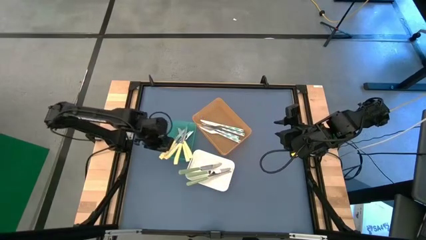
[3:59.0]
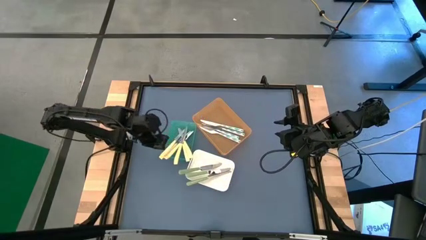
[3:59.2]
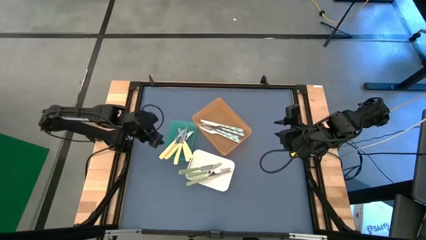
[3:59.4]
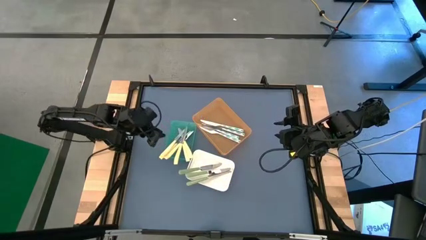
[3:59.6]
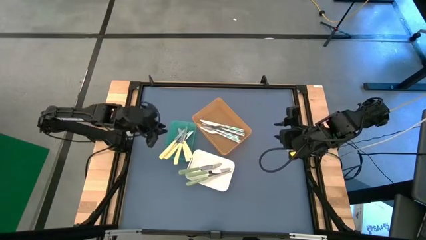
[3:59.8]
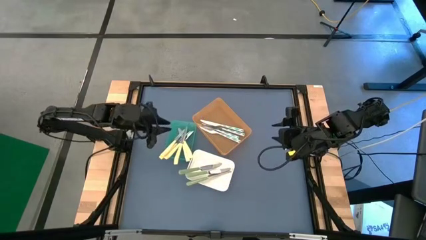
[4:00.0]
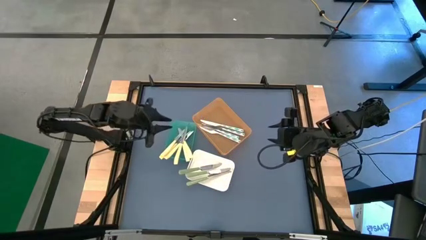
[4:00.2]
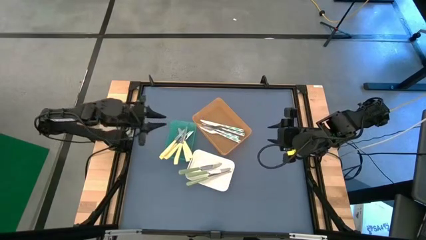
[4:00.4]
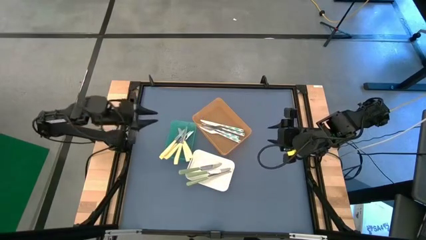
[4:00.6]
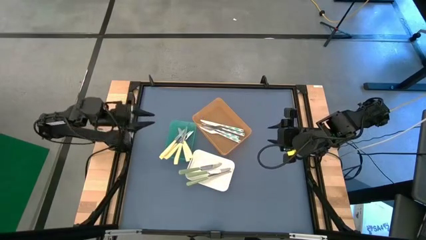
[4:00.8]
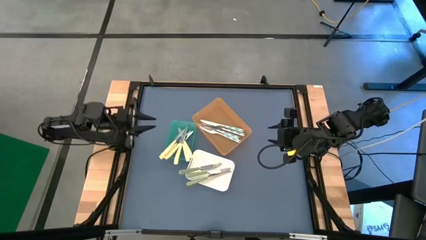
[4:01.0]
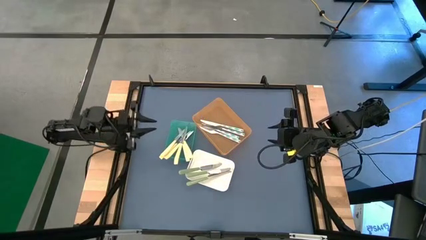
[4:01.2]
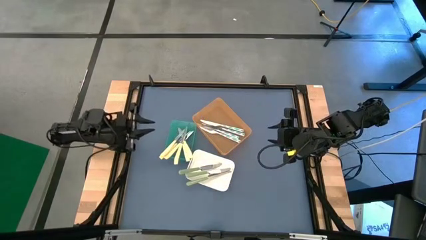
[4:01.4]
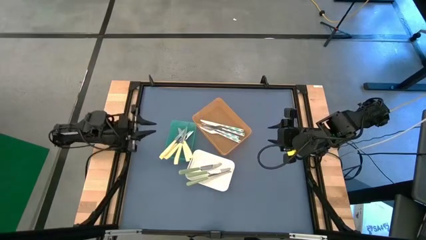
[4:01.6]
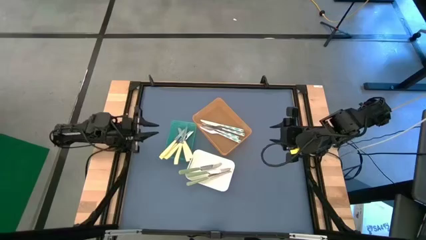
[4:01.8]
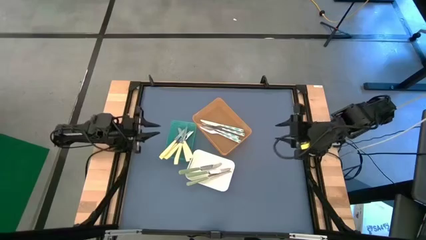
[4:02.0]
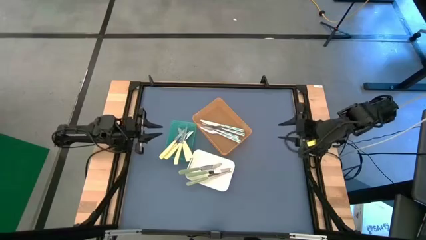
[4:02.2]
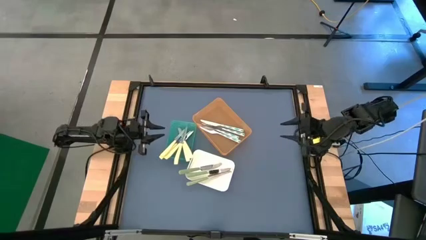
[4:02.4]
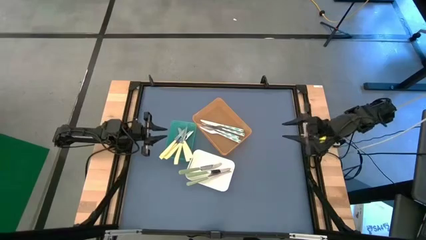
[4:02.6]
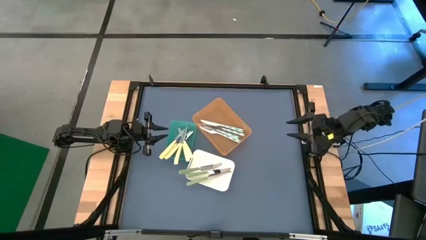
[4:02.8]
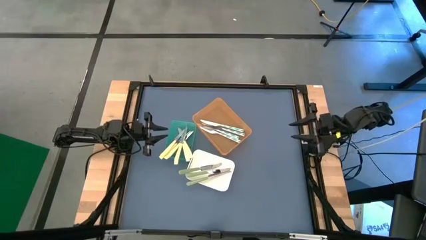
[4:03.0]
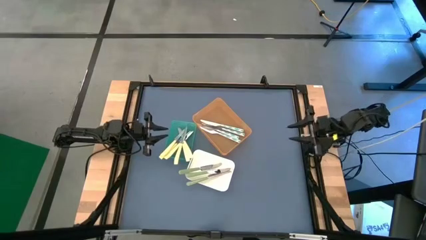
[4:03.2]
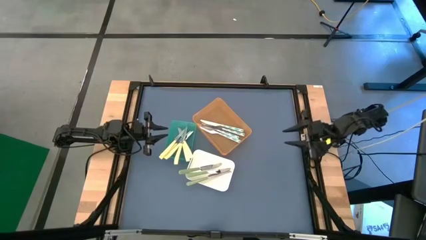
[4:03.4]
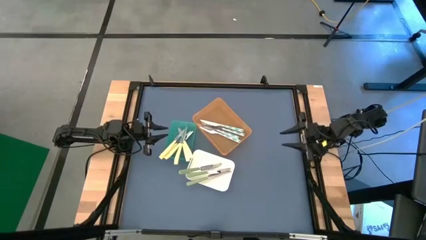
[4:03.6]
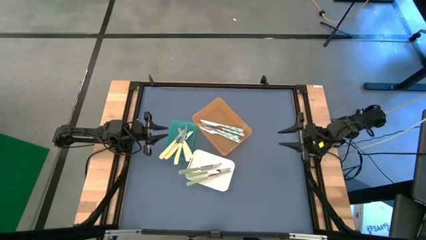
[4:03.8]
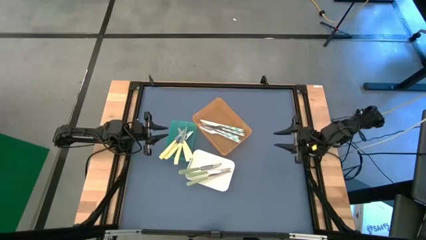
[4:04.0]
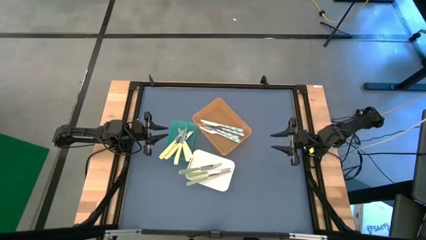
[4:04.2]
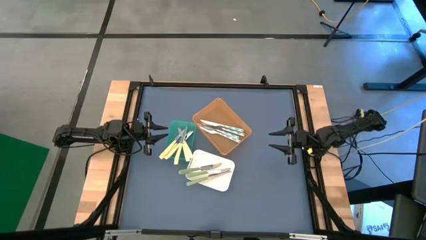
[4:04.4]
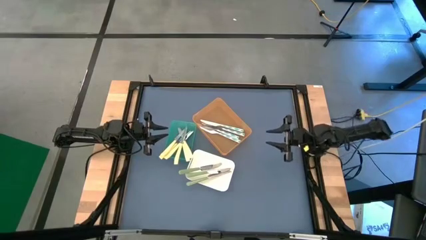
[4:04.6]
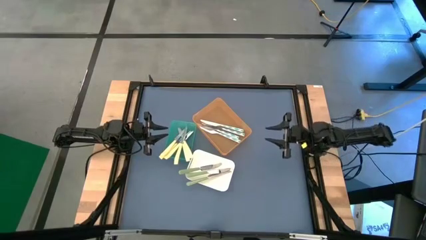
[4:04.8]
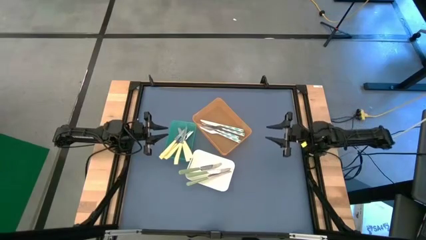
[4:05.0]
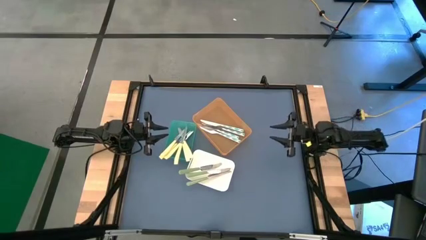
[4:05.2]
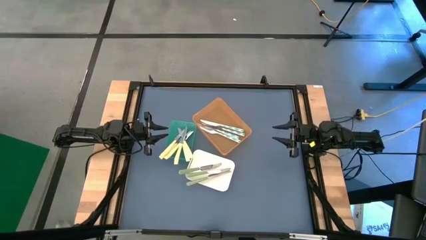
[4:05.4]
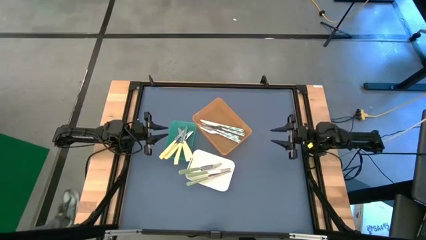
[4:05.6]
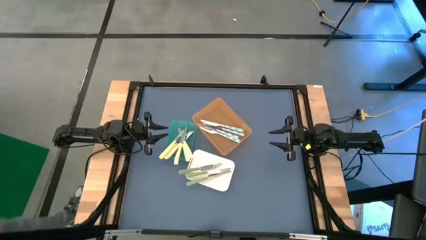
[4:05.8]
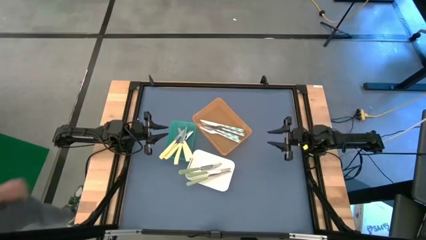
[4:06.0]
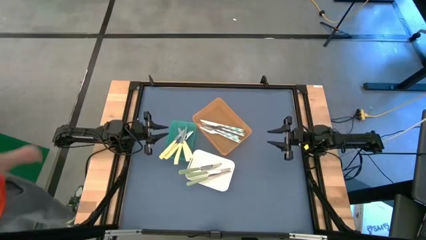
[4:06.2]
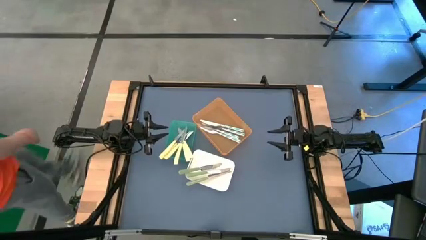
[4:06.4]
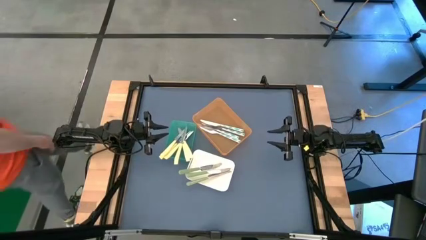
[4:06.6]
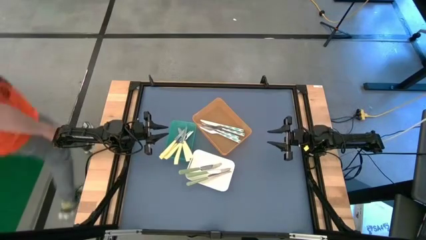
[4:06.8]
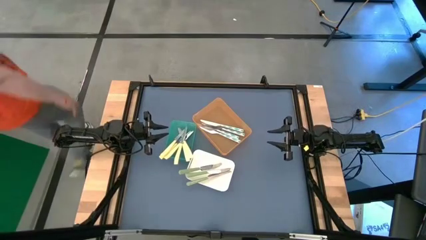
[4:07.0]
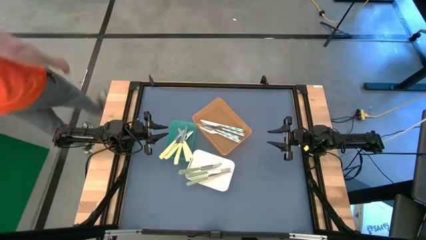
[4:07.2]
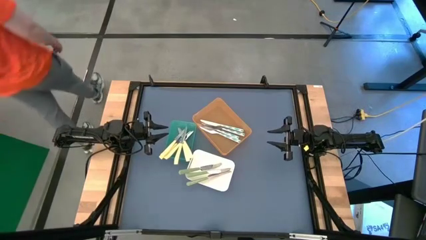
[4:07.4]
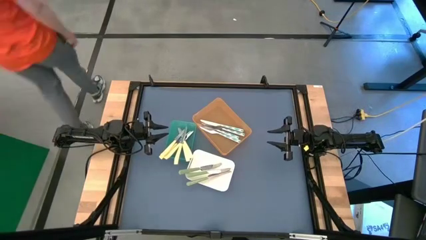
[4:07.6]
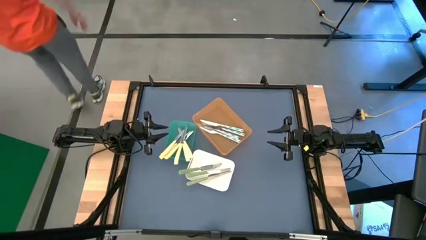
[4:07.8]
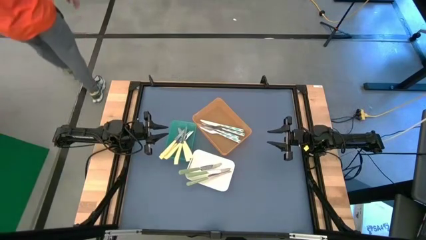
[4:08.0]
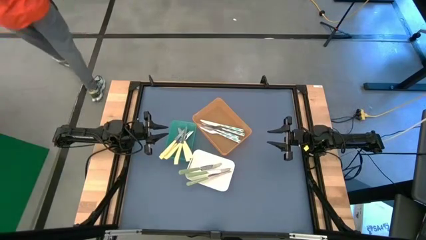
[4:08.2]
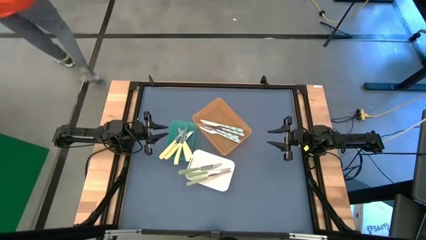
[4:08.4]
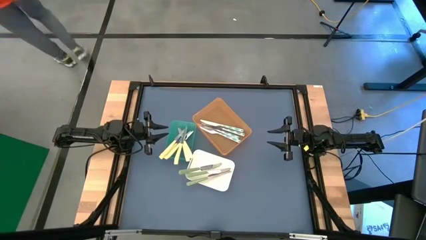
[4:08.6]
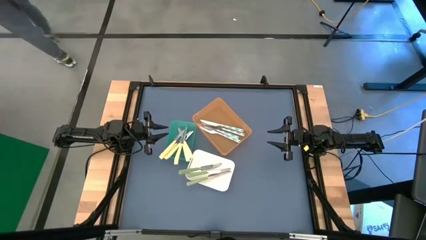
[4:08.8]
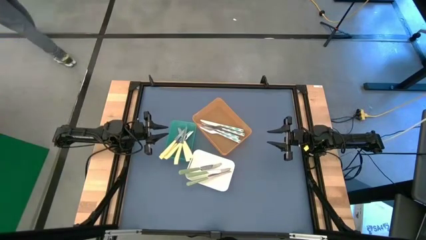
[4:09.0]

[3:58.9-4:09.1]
Task: Sort silverware by color (type)
Return to Home Position

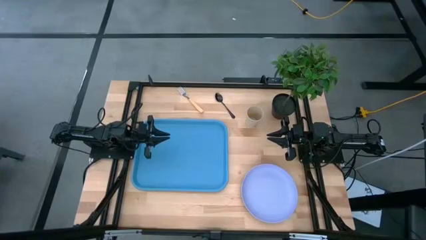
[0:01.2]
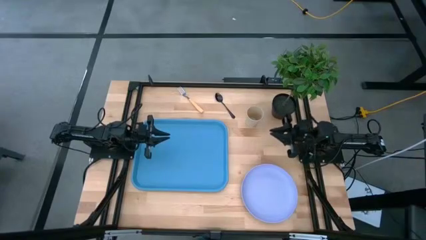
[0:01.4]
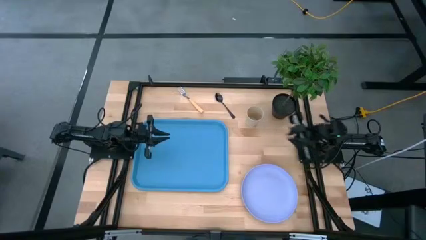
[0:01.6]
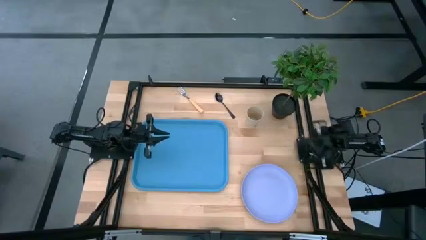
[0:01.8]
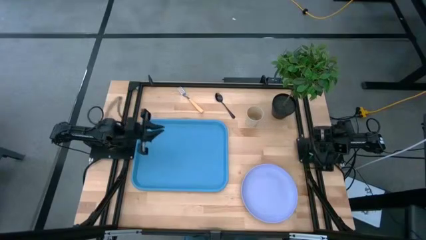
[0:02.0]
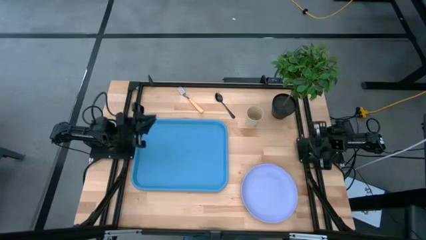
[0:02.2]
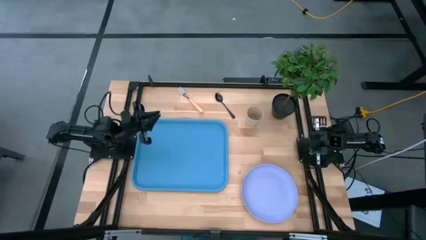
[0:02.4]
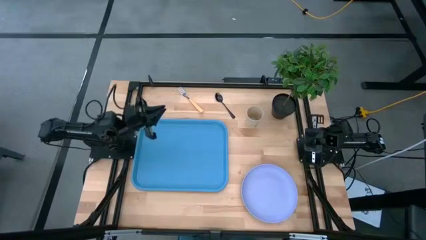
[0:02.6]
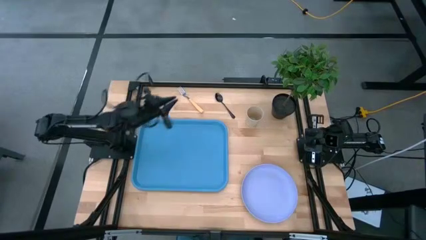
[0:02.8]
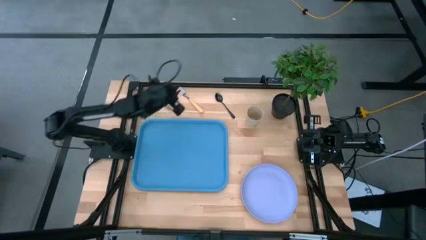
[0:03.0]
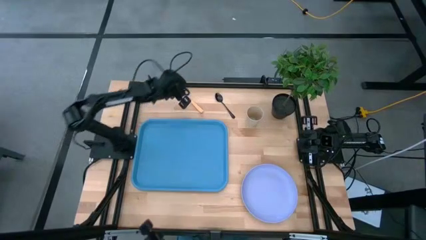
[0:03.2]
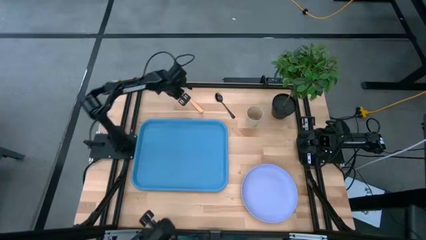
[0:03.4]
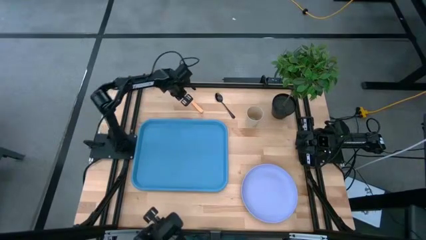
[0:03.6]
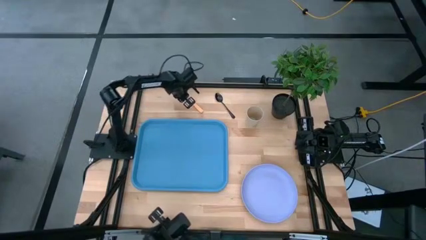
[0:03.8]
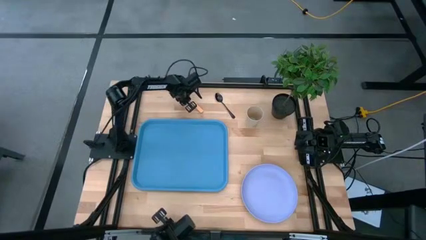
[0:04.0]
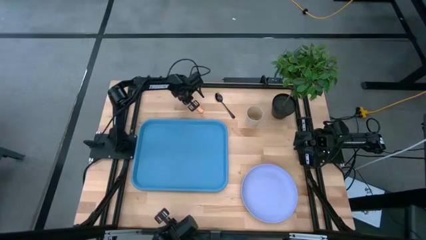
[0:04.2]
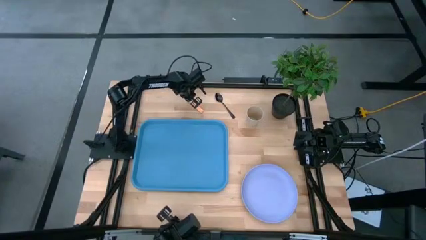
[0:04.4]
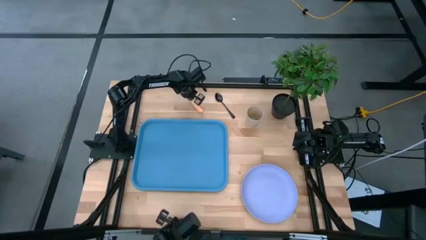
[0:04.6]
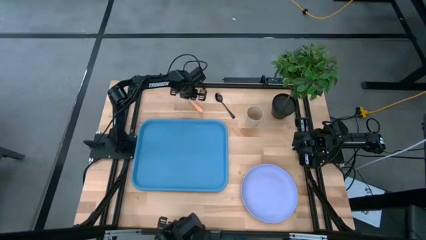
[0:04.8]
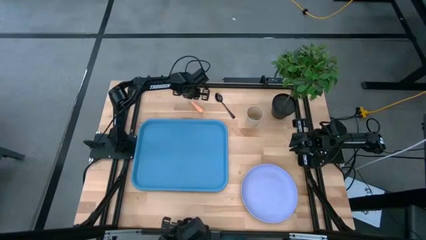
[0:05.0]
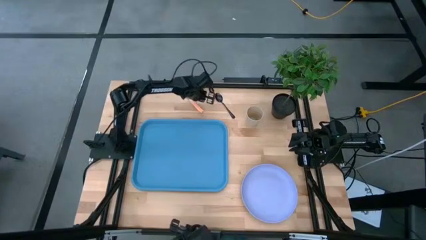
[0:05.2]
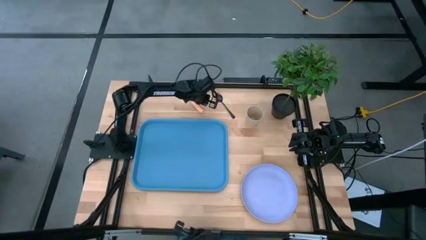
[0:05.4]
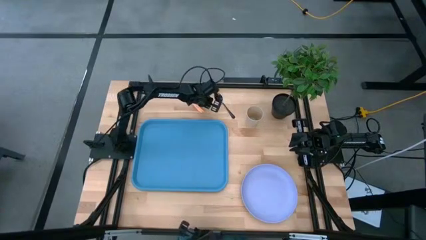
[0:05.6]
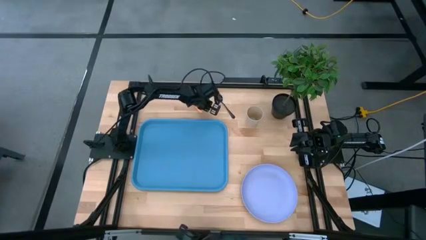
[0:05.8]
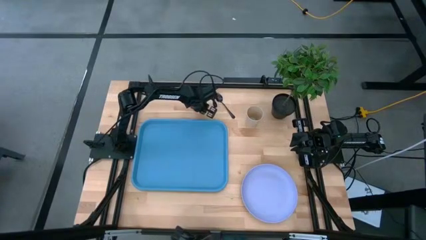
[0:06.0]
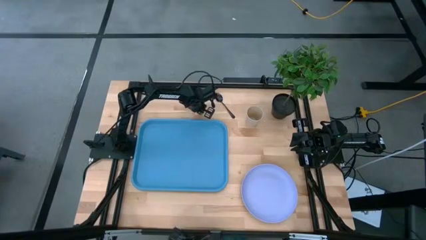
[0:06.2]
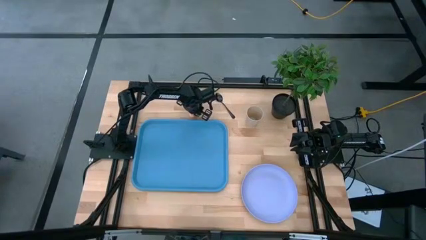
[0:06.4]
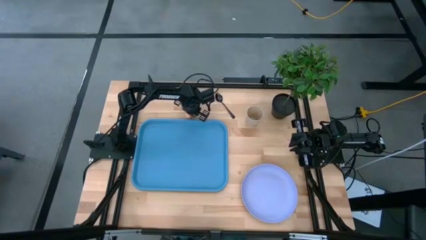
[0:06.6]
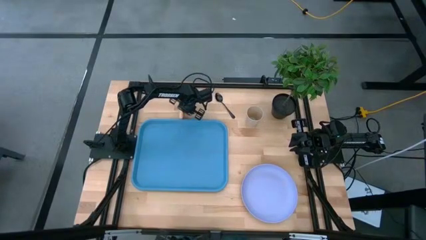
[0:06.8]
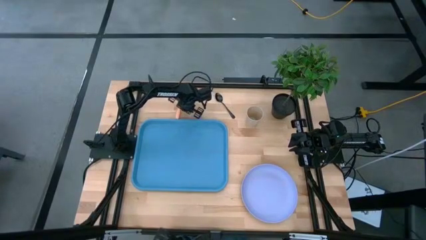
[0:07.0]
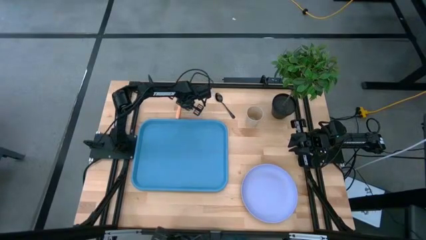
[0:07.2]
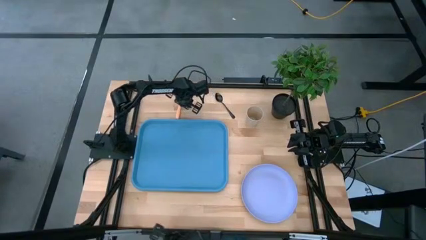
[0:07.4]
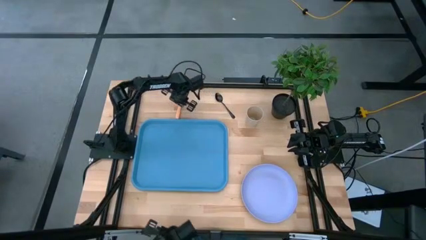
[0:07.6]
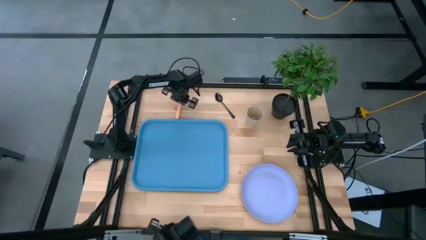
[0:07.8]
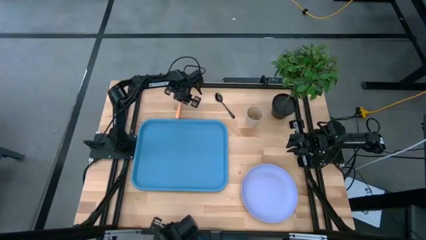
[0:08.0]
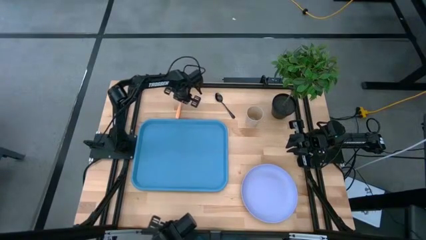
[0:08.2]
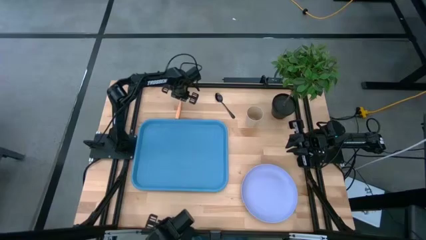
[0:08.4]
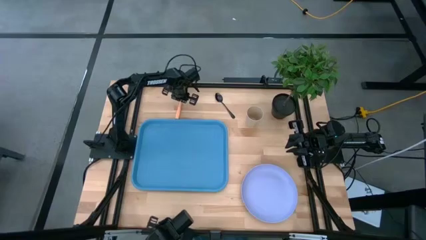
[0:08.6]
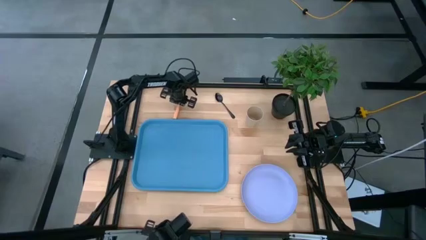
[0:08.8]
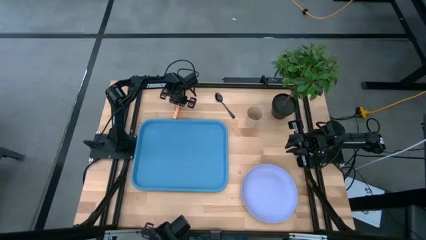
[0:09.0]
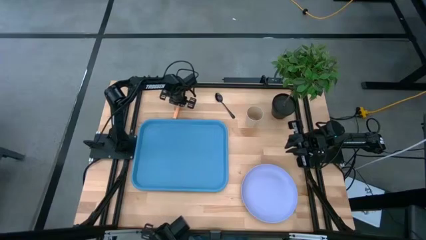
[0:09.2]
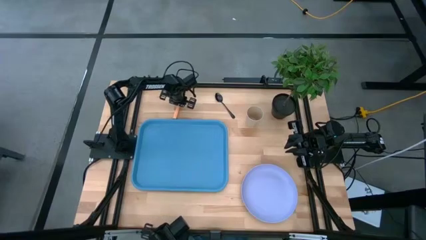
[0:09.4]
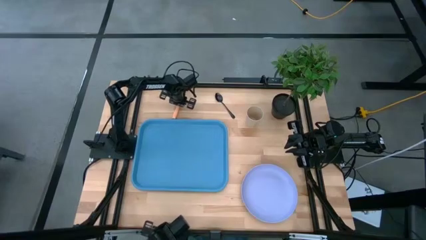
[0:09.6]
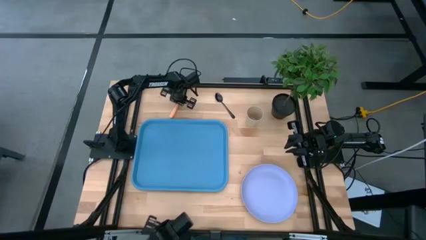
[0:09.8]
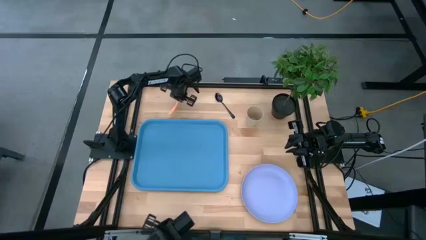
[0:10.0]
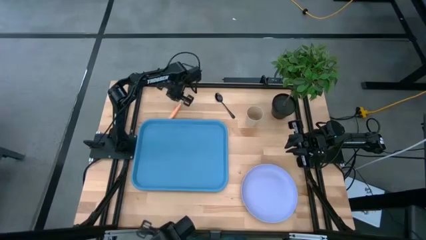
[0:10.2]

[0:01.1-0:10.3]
Task: Pick and place plate/cup/fork/spoon on tray
Put the orange fork on the blue tray
